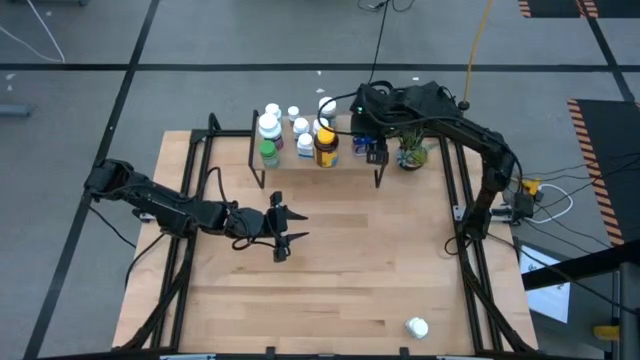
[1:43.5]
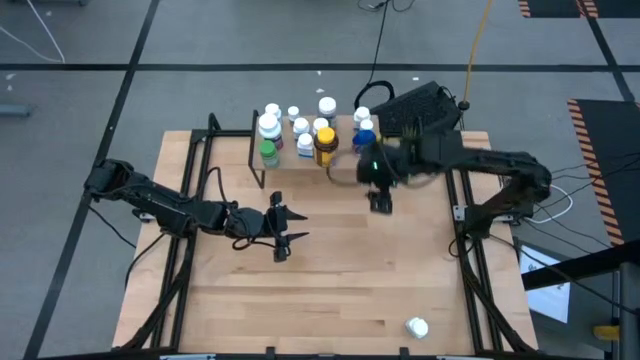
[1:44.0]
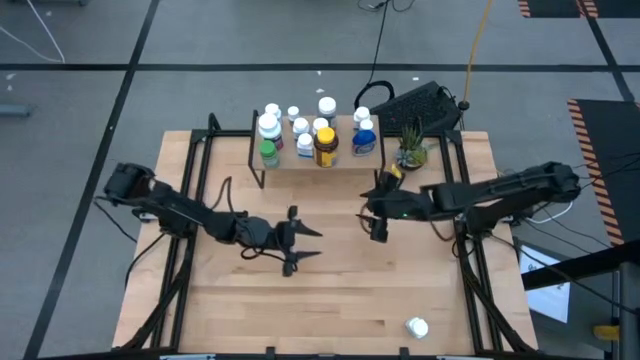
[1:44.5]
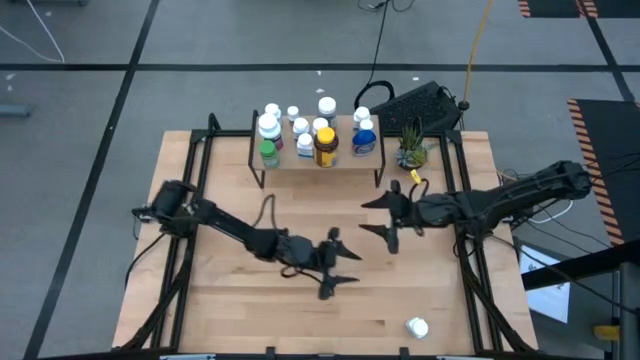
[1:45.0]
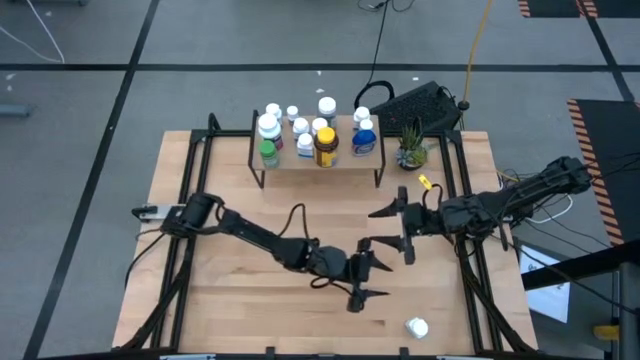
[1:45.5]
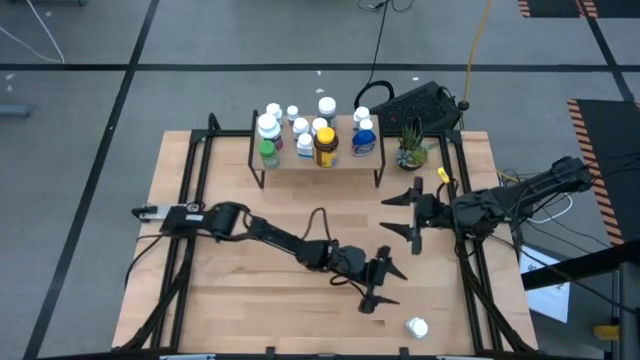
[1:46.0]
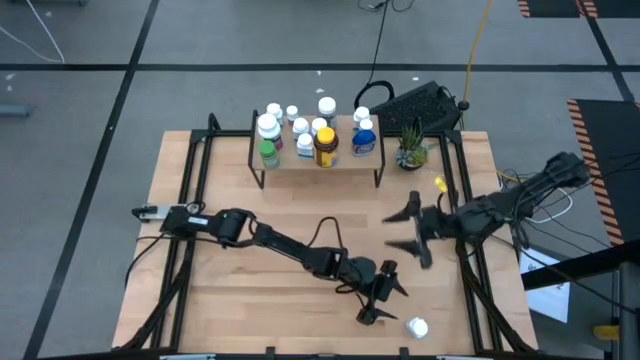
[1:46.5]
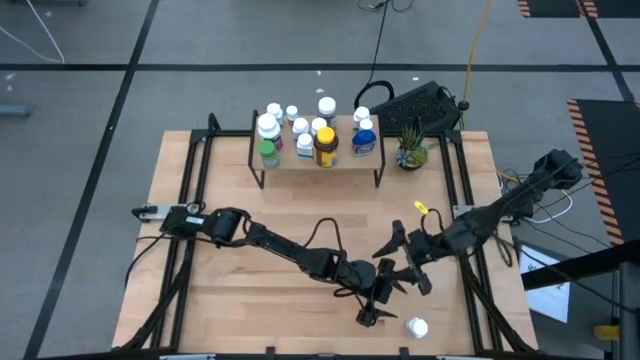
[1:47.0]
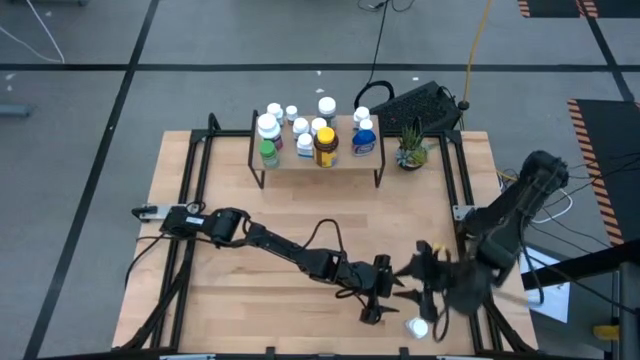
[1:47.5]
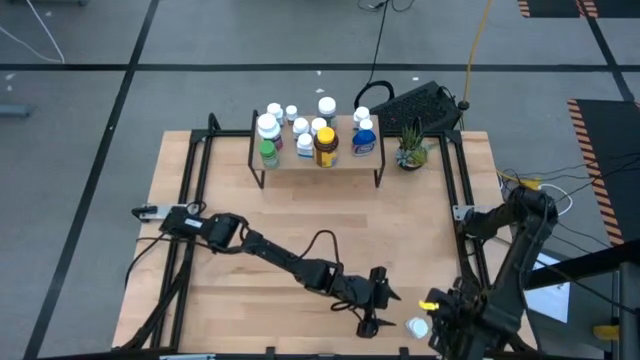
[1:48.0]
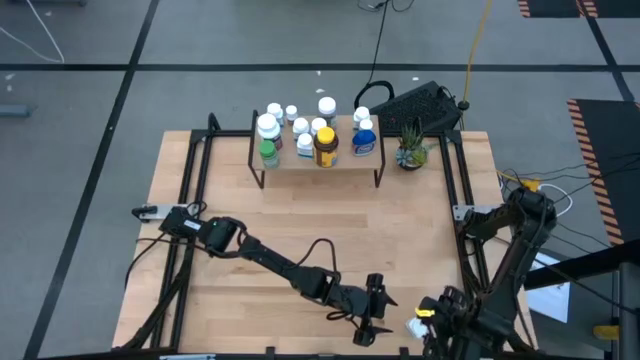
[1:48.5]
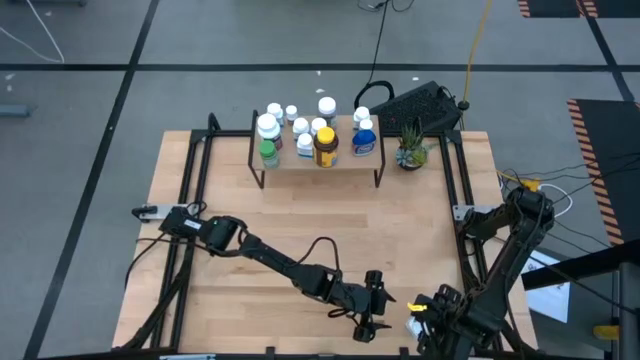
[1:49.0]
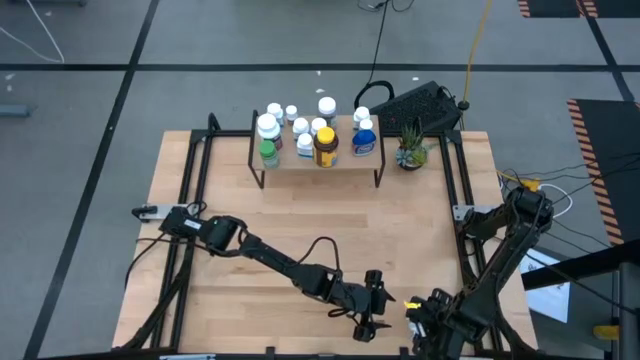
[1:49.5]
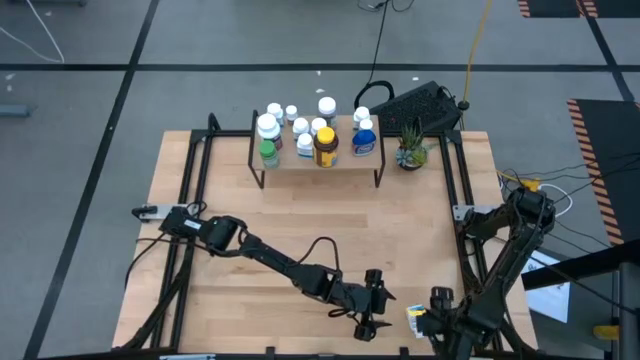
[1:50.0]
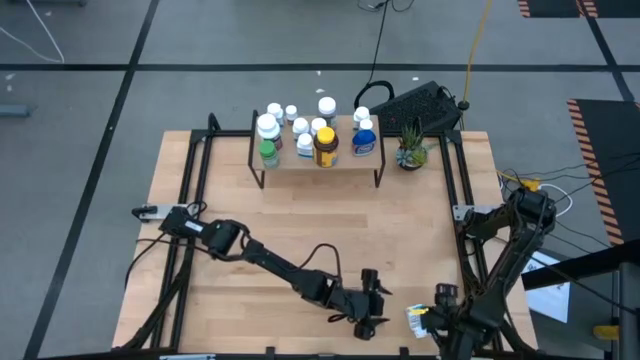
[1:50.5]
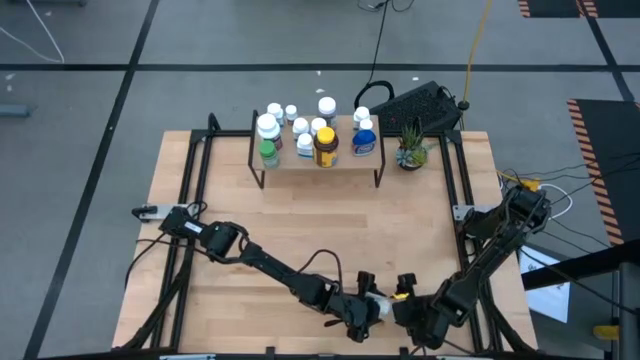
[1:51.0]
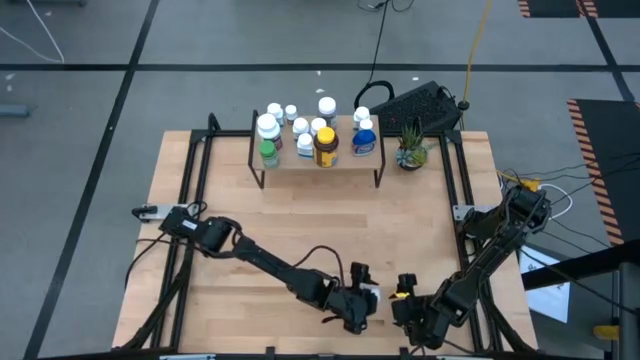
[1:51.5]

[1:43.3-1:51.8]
Task: Pick and place medicine bottles onto shelf by color
Put the white pill bottle on the shelf

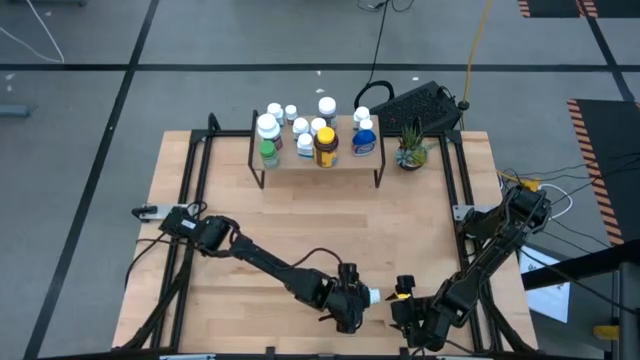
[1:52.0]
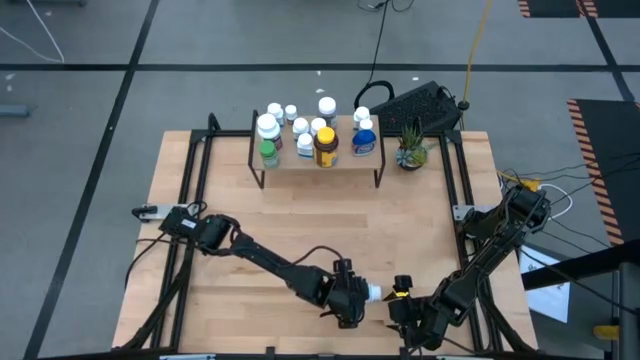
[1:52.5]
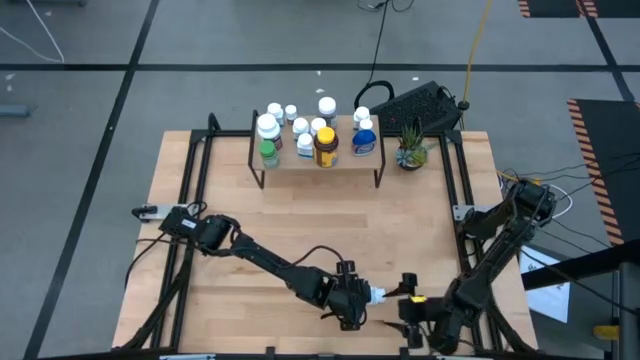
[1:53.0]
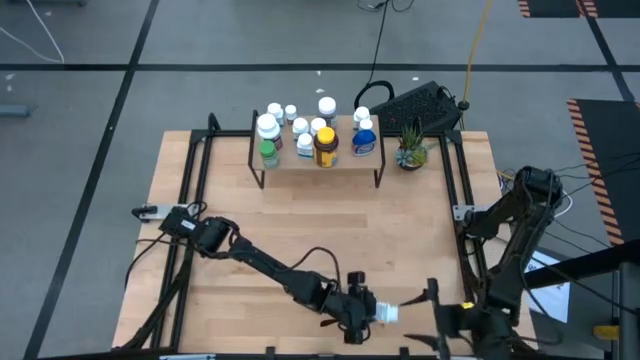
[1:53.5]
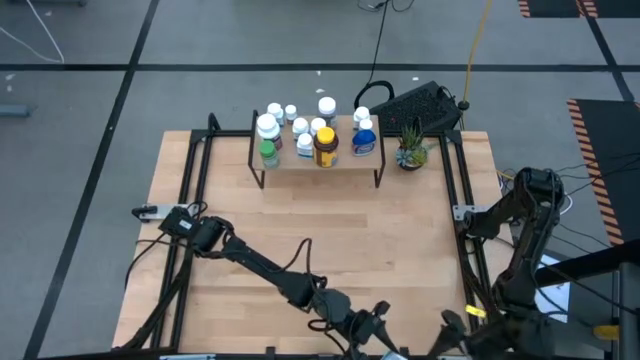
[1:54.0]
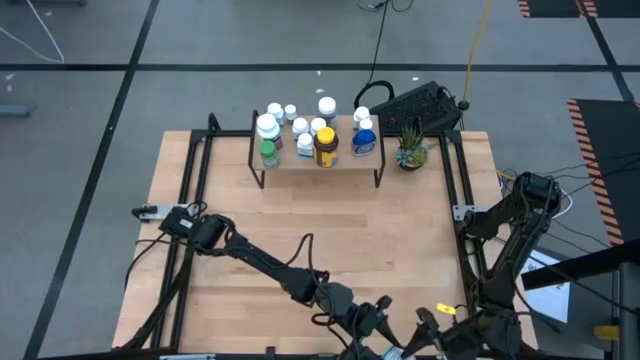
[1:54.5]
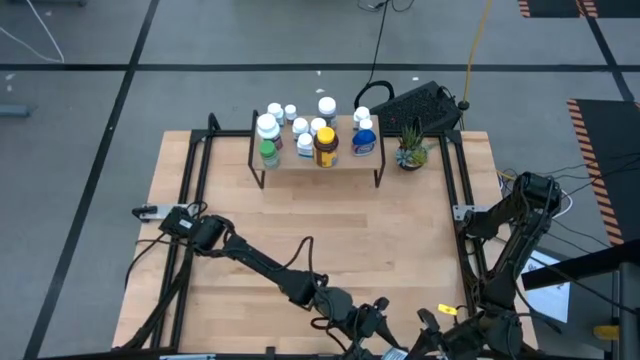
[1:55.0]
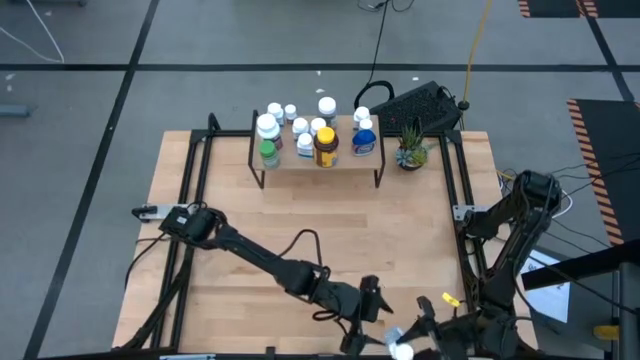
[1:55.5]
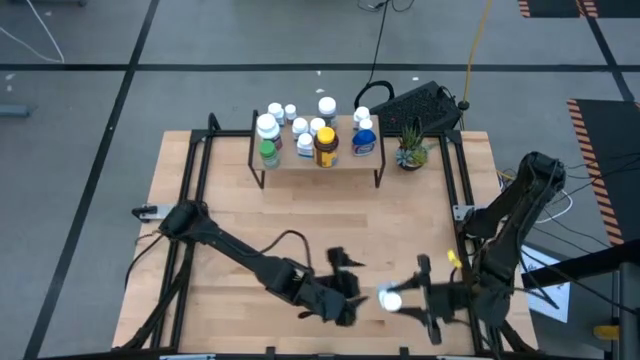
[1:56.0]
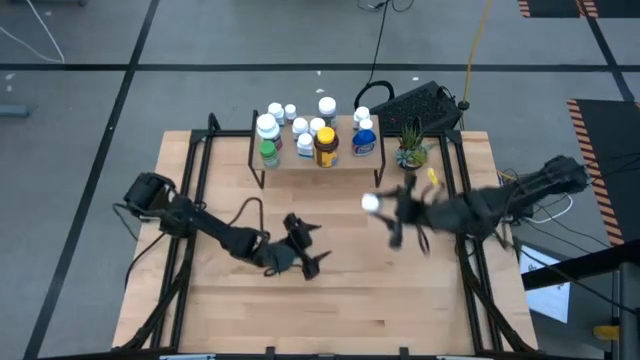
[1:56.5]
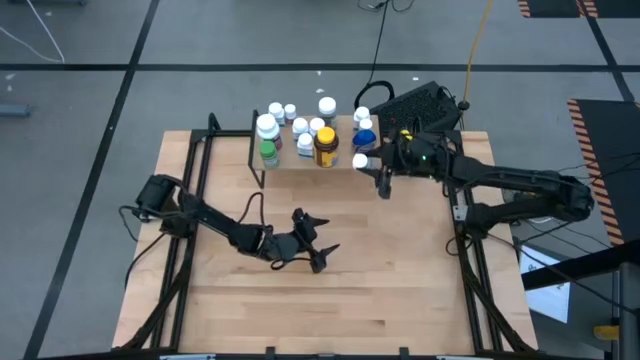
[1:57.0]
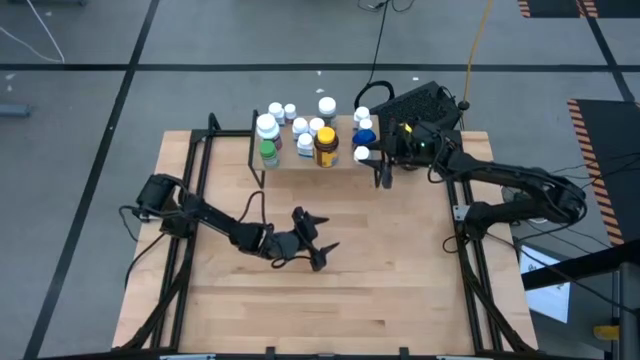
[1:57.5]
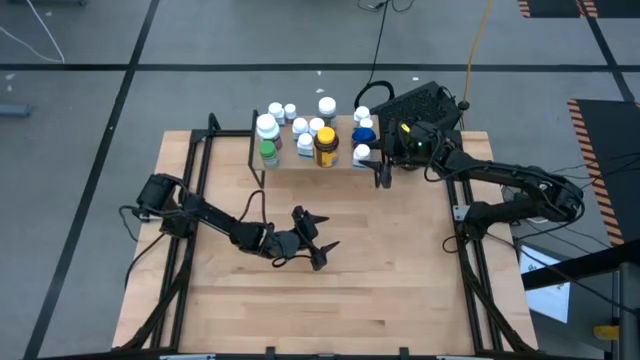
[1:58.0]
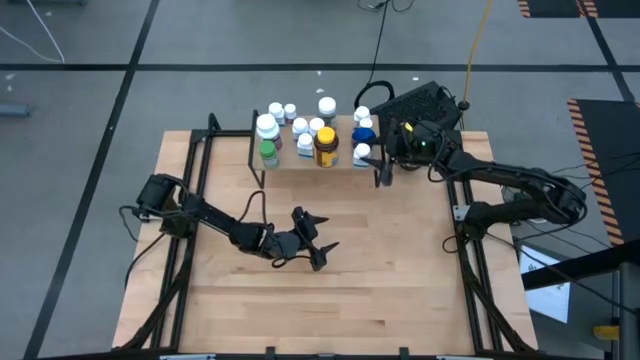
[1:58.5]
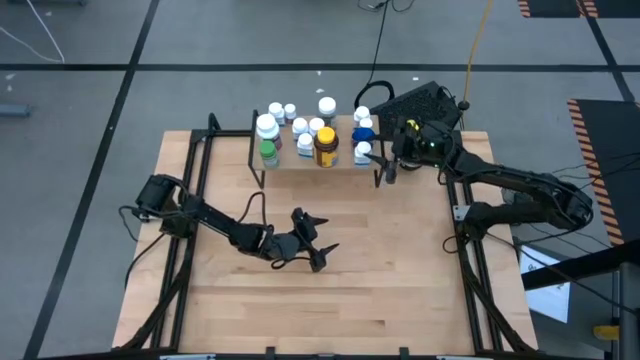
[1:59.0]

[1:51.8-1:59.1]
Put the white pill bottle on the shelf

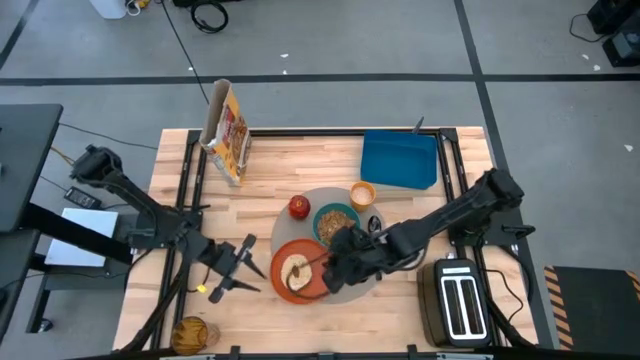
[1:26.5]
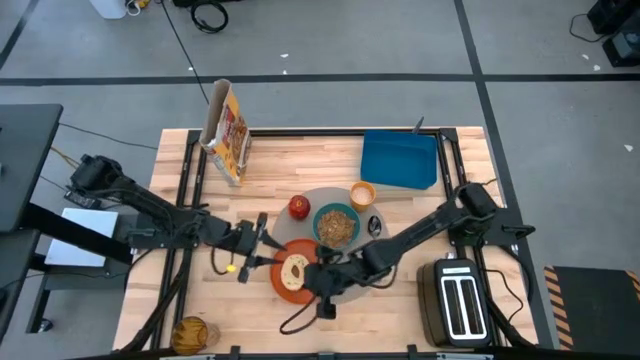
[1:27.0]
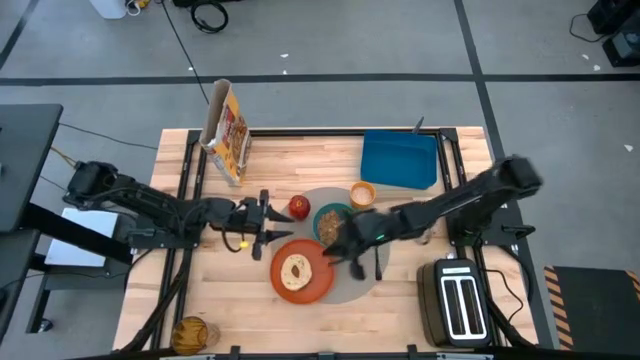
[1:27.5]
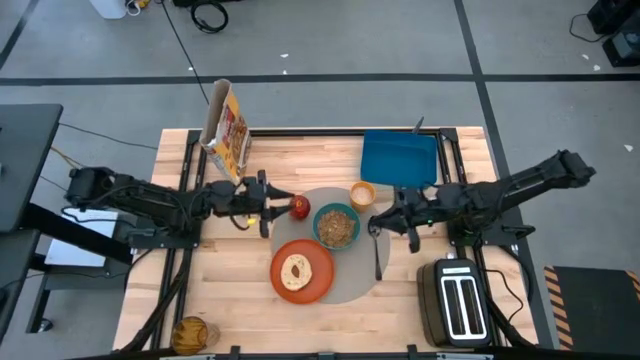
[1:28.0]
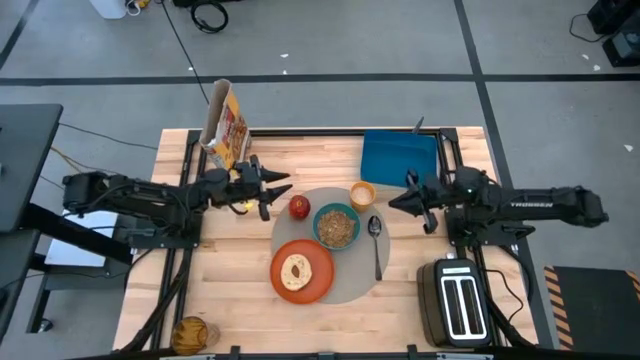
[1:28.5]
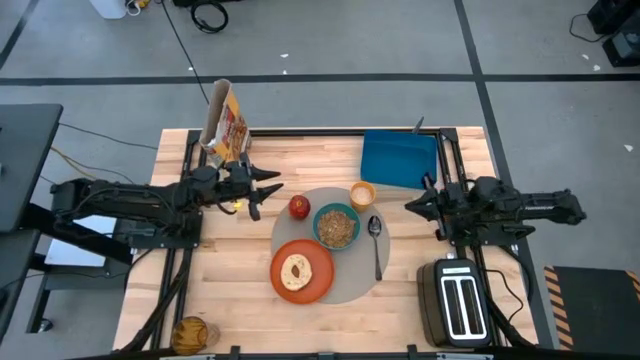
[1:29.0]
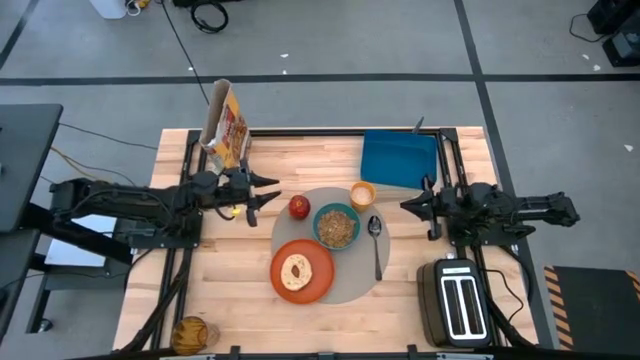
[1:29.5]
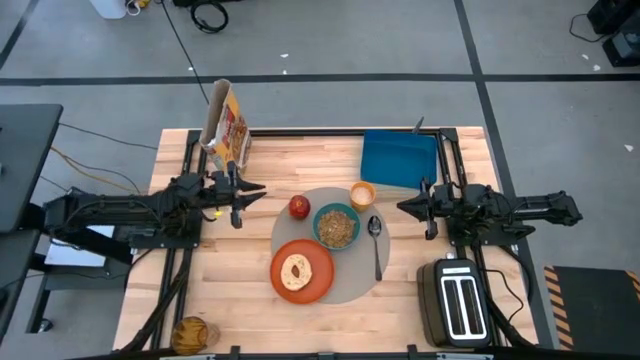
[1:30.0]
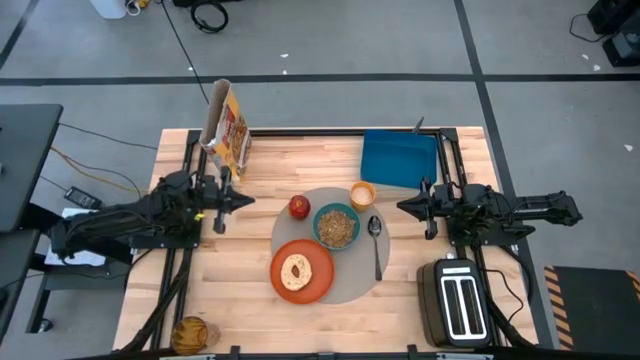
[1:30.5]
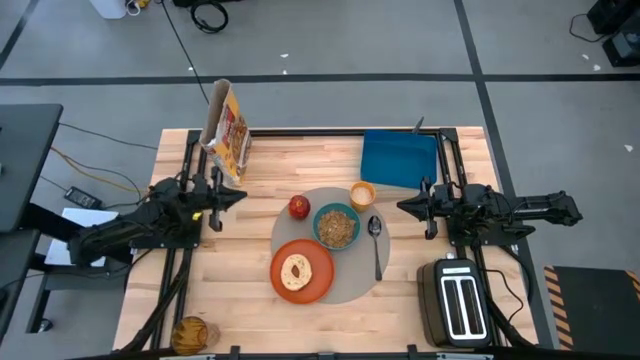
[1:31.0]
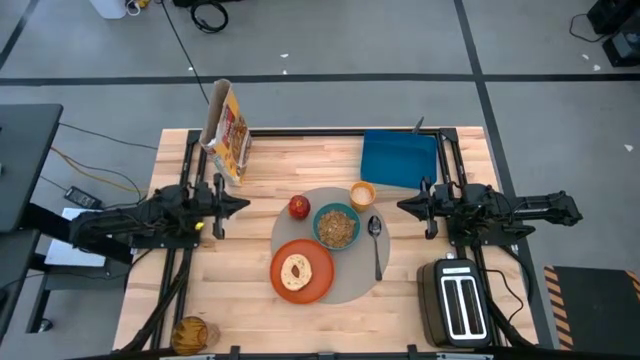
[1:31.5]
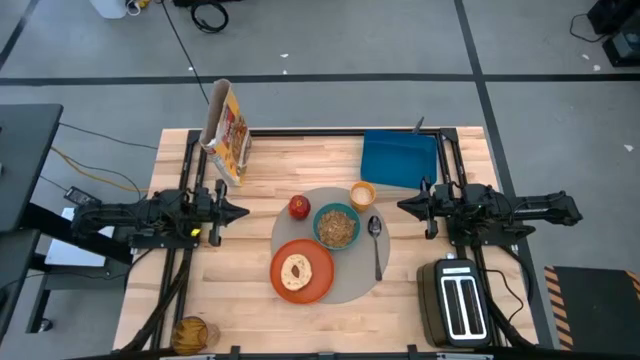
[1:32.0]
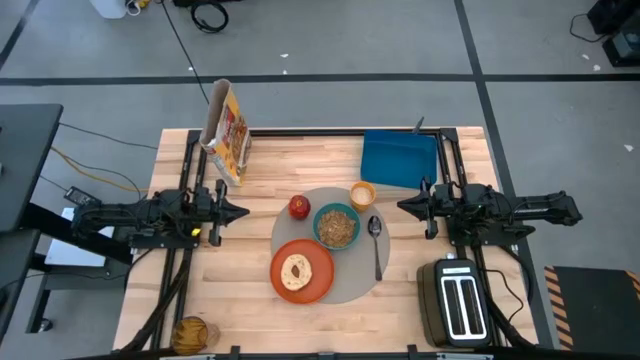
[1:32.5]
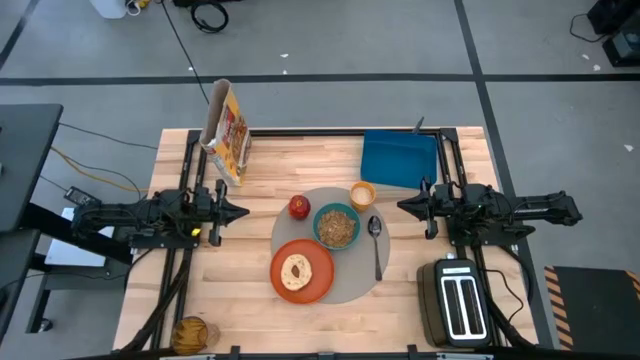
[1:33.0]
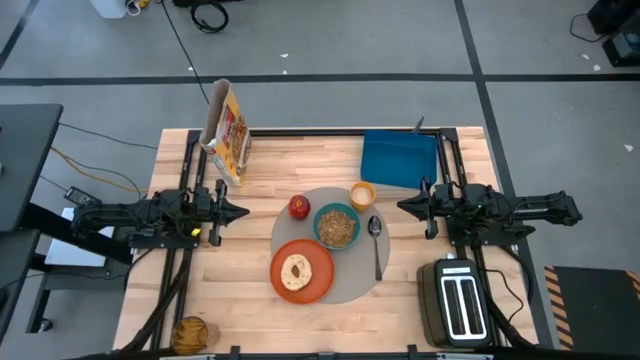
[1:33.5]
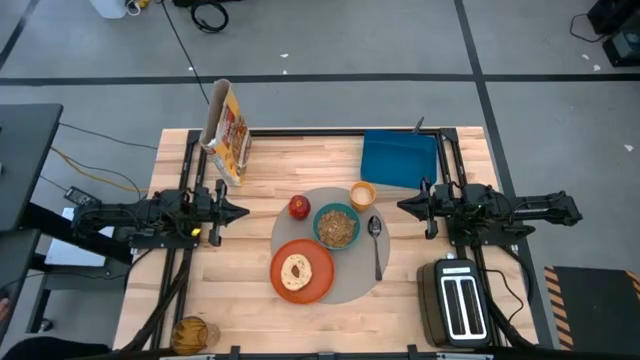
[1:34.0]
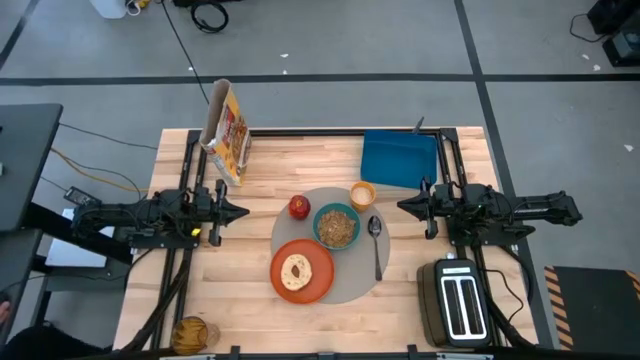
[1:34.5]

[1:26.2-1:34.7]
Task: Arrange a breakfast setting
Return to Home Position
